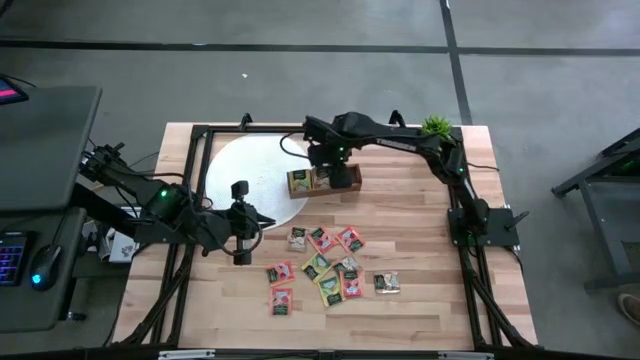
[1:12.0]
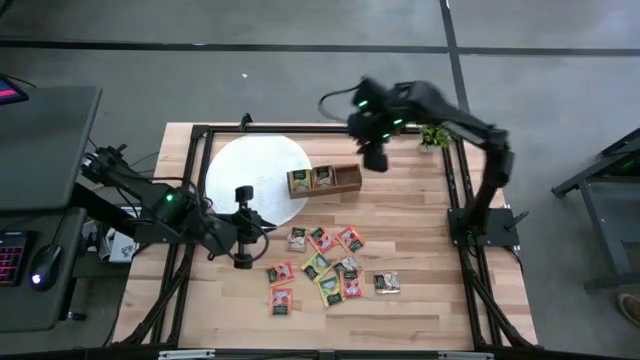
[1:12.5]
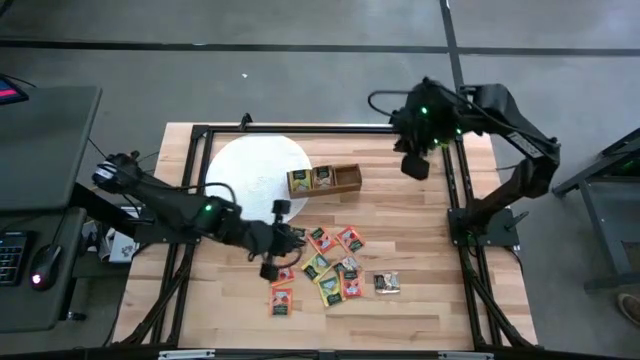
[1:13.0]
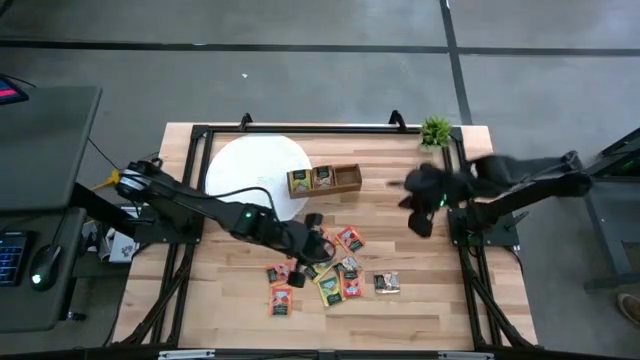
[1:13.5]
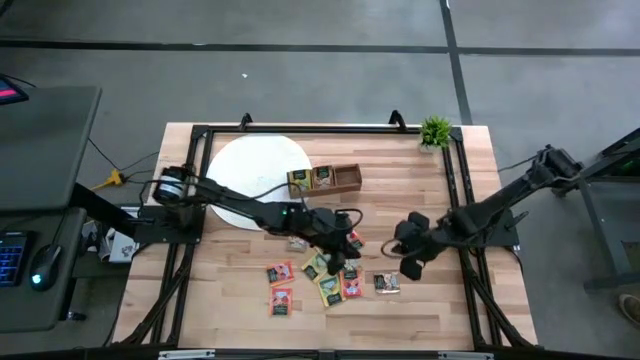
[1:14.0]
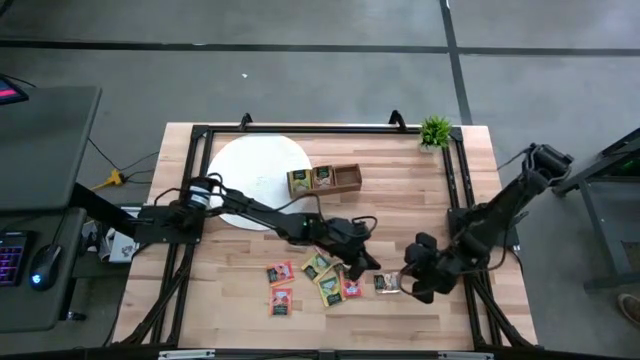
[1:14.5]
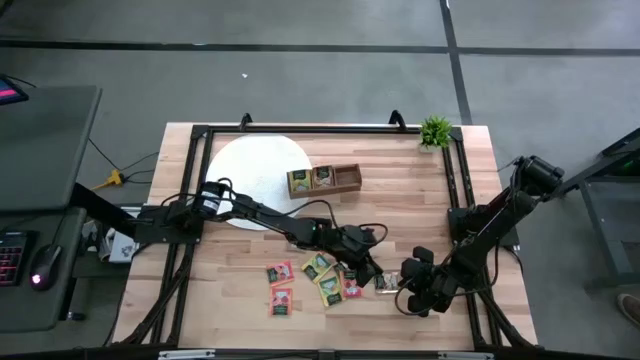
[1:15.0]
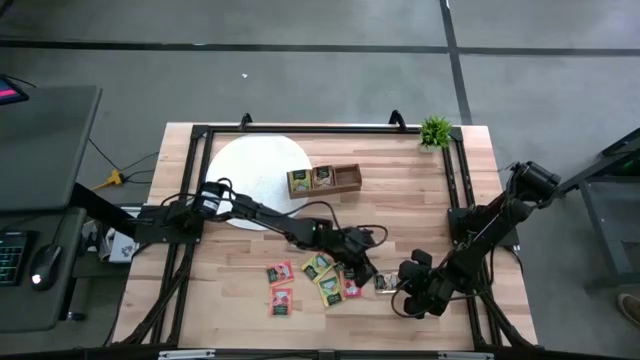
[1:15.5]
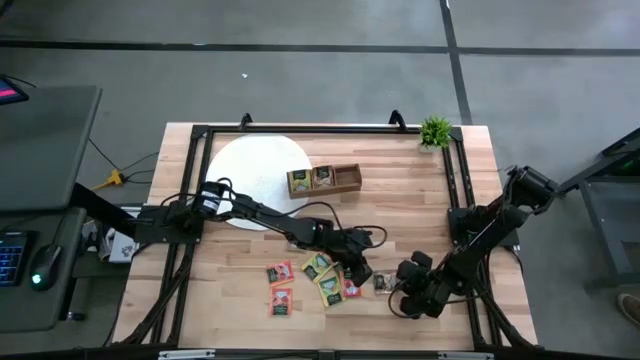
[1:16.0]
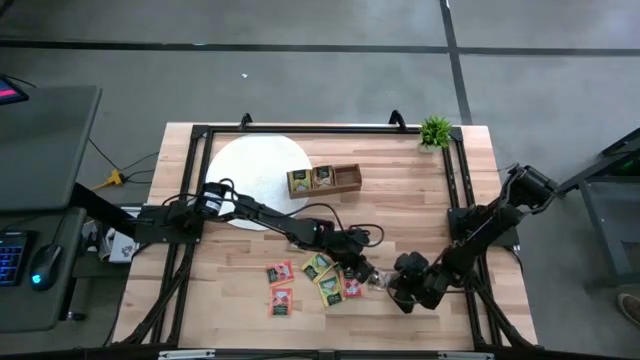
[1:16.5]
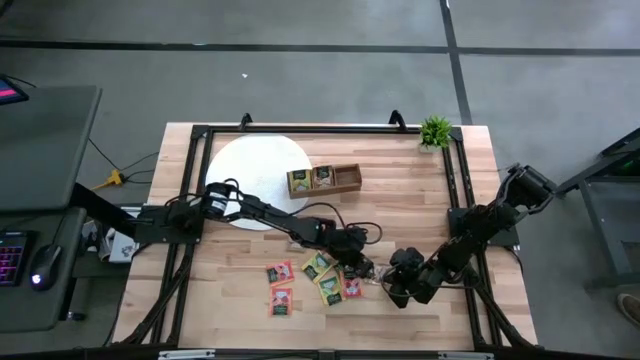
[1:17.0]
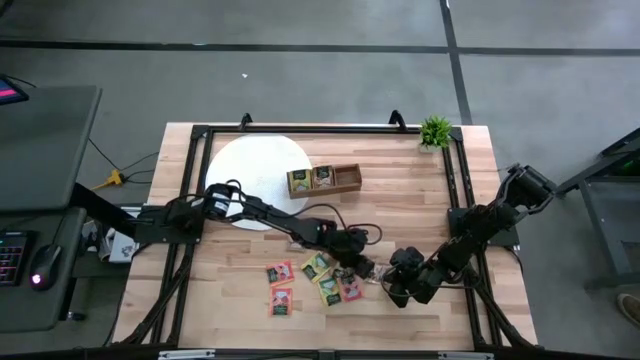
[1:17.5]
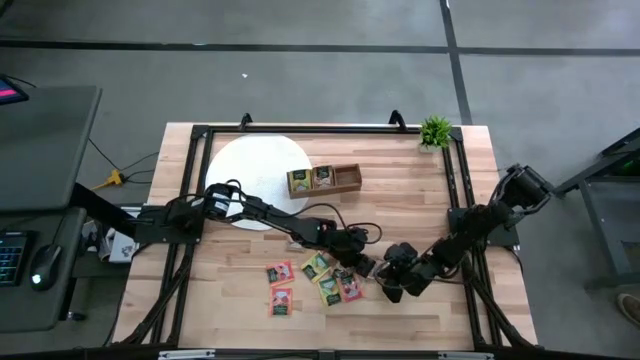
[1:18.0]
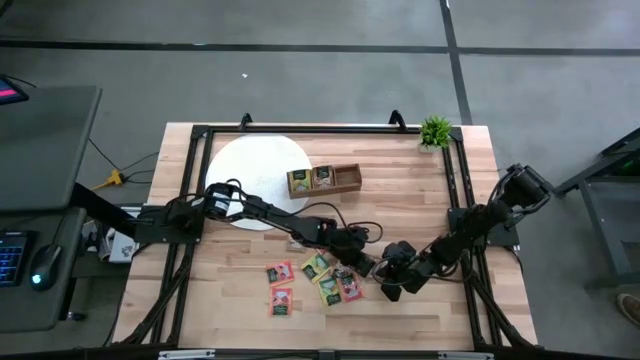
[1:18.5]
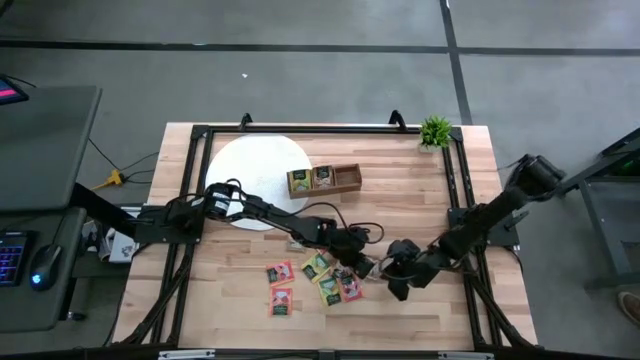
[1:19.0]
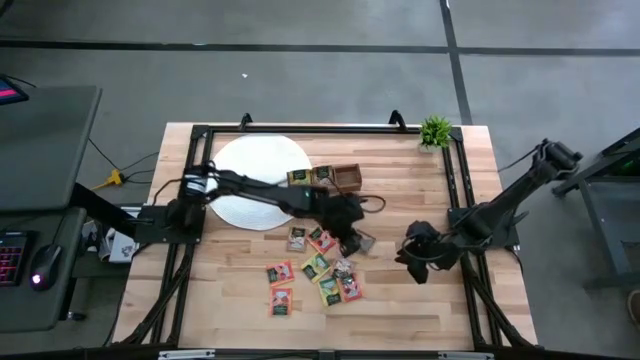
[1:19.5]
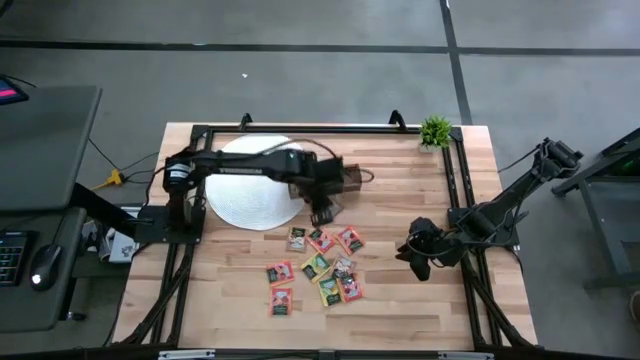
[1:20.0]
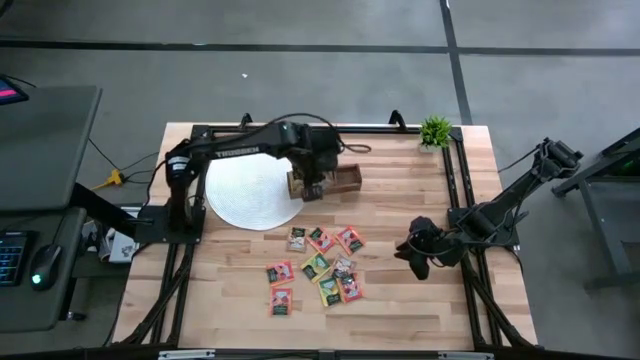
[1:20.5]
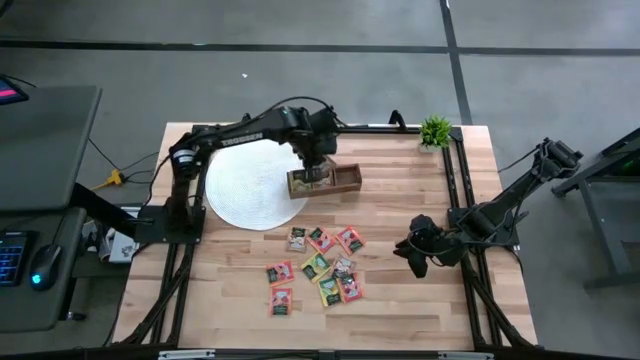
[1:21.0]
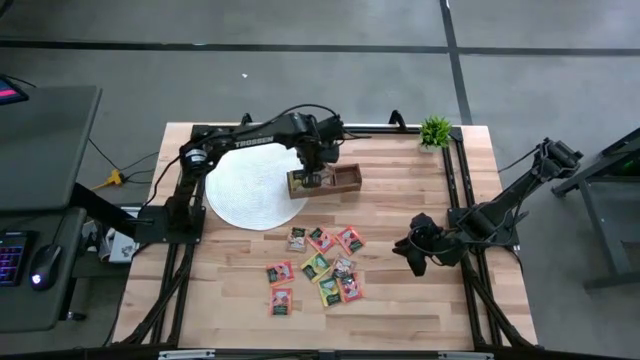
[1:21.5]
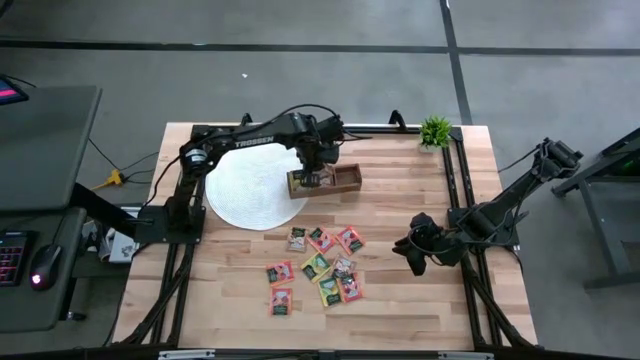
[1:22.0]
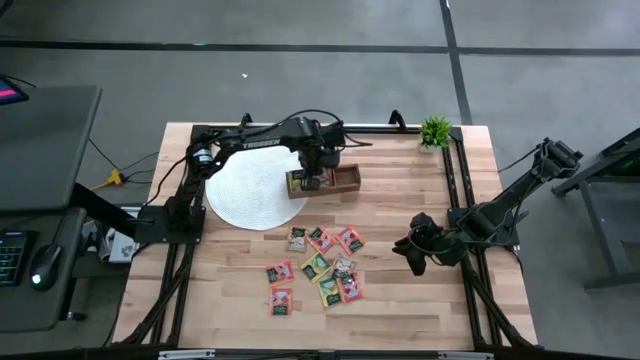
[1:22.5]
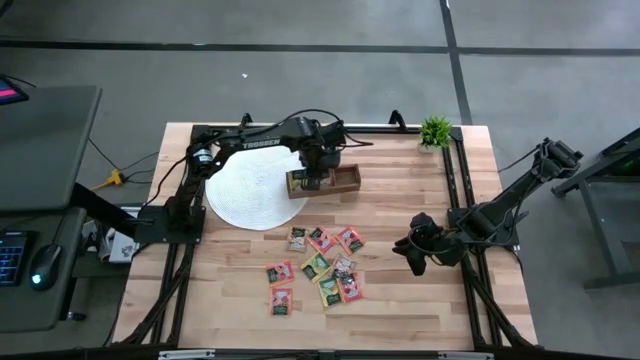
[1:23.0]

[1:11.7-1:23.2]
Task: Pick & Place Tea
Put the brown tea bag into the middle compartment of the wooden organizer

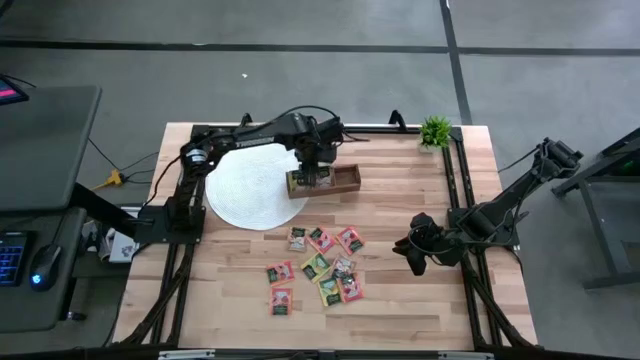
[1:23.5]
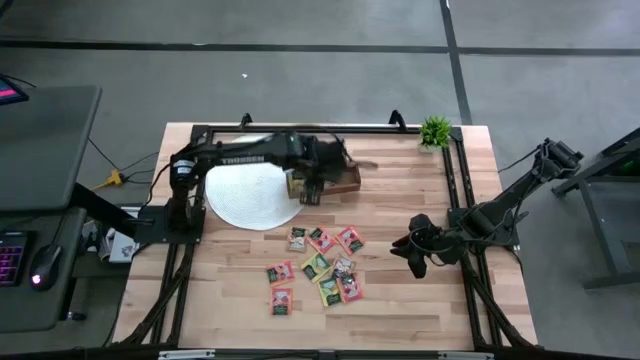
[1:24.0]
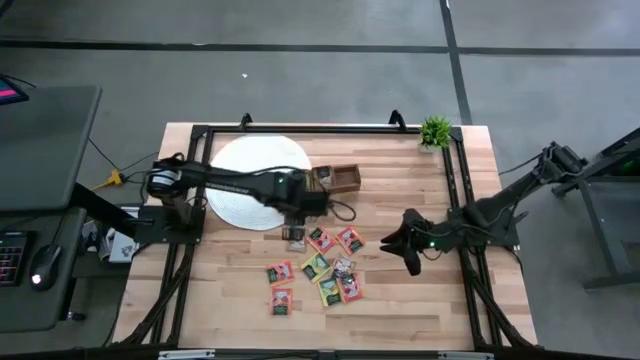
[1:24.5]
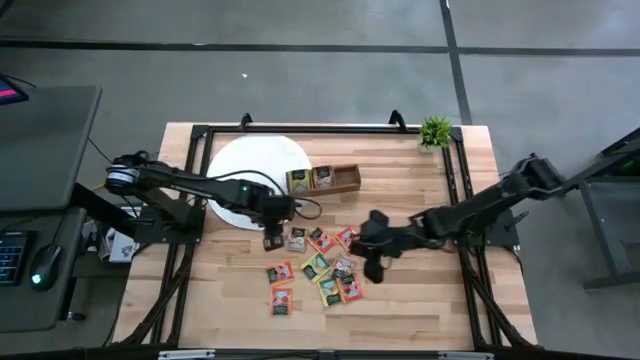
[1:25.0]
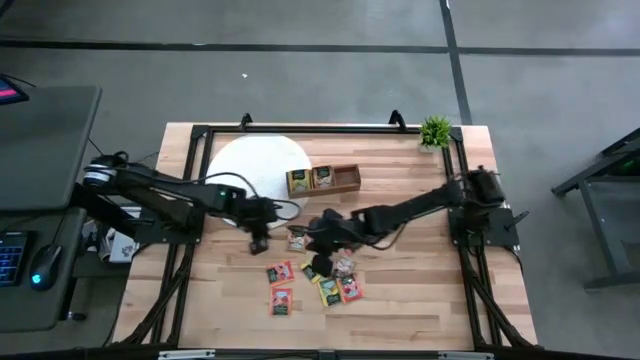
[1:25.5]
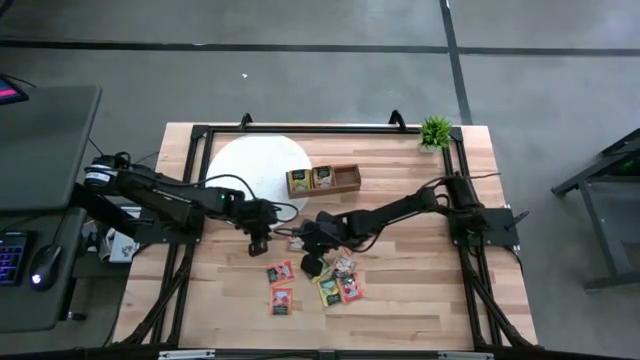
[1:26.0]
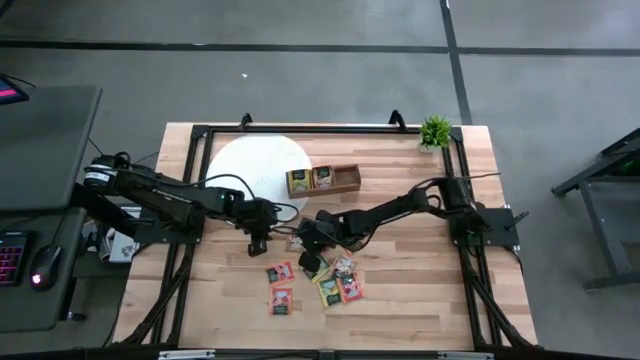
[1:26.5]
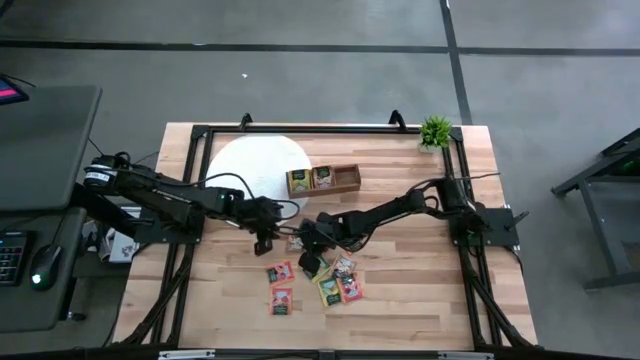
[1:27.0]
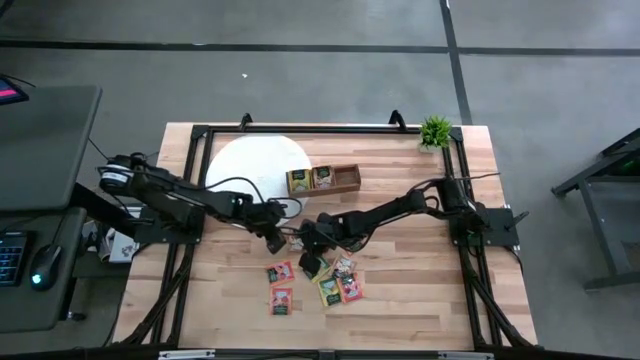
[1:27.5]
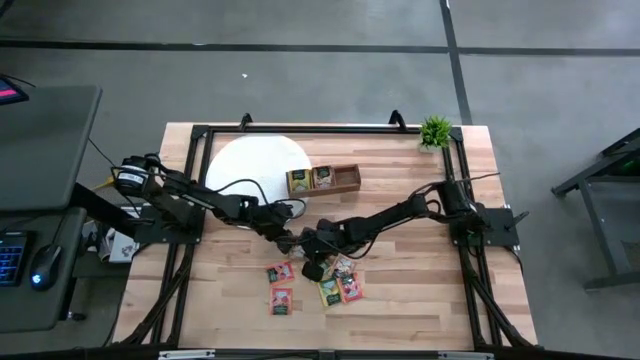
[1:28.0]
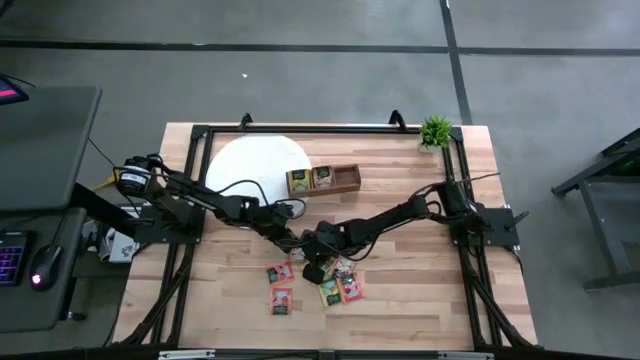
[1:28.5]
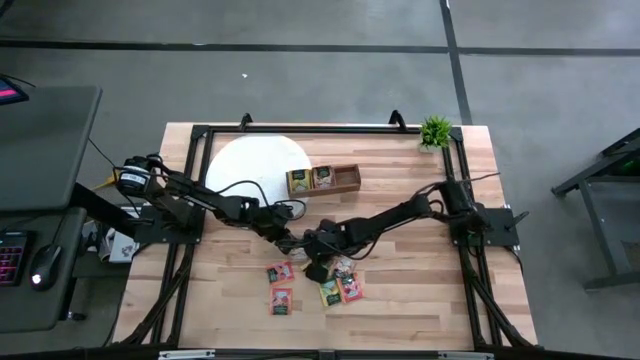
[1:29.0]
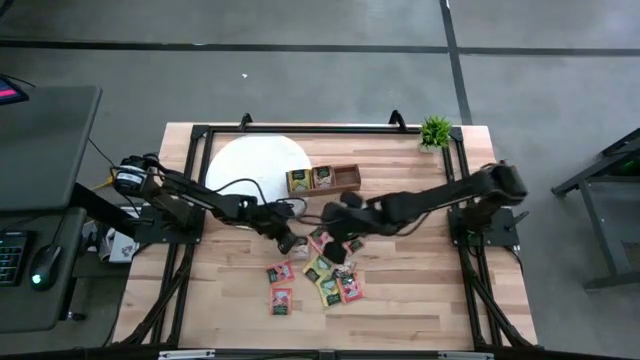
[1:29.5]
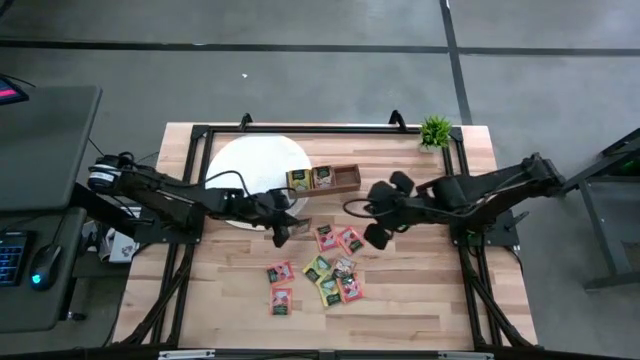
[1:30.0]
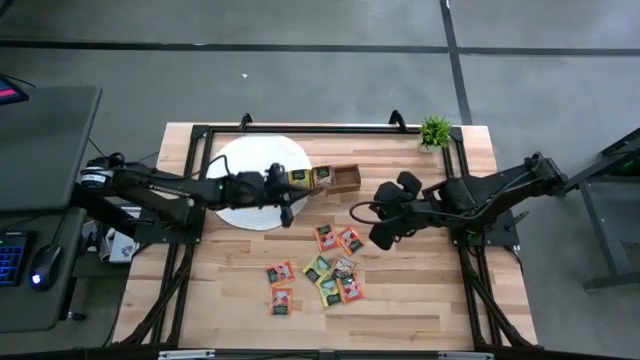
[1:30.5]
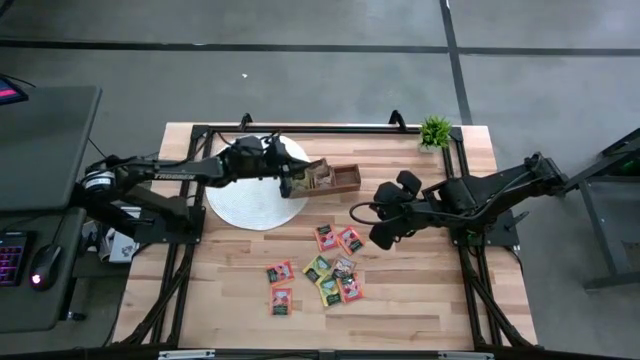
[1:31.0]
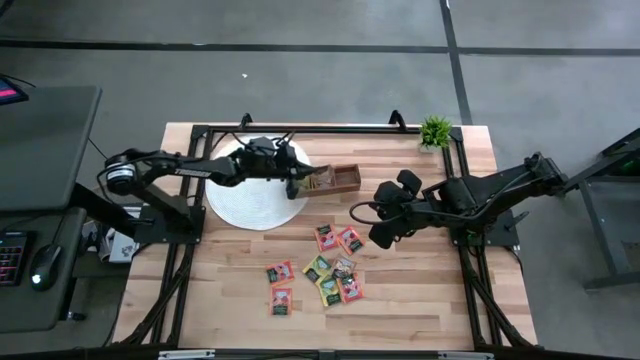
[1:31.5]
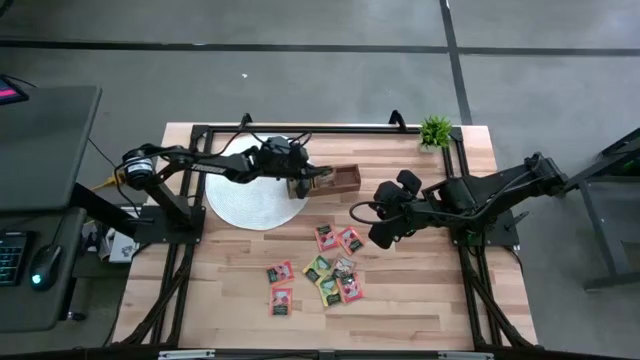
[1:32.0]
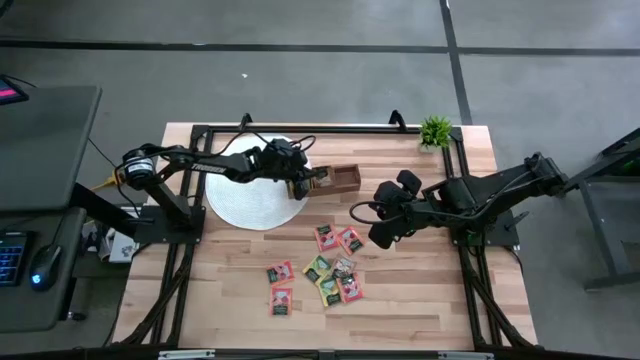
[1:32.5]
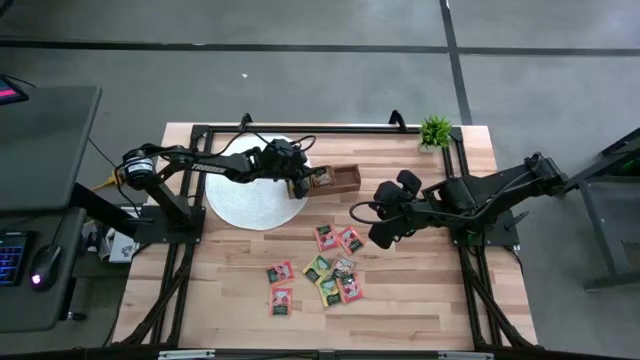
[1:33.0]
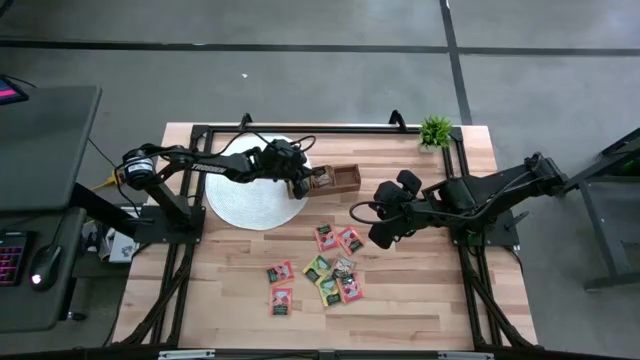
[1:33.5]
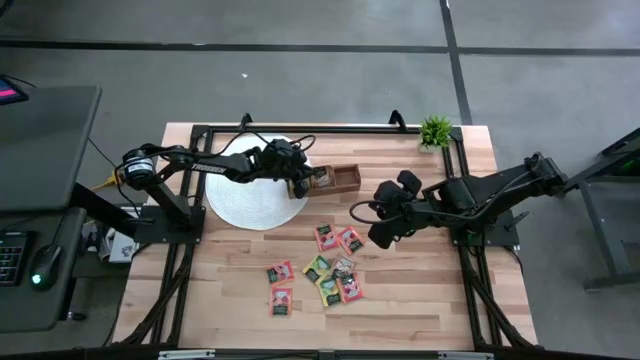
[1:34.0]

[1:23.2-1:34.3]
Put the brown tea bag into the middle compartment of the wooden organizer
